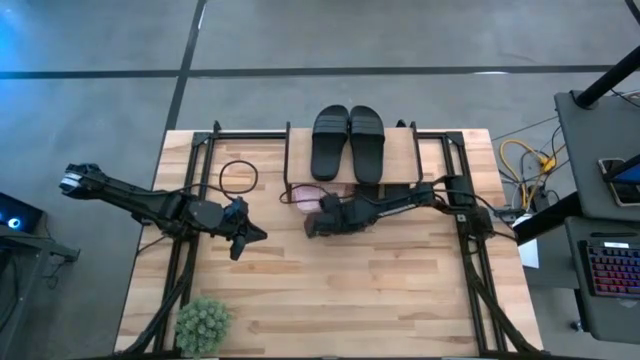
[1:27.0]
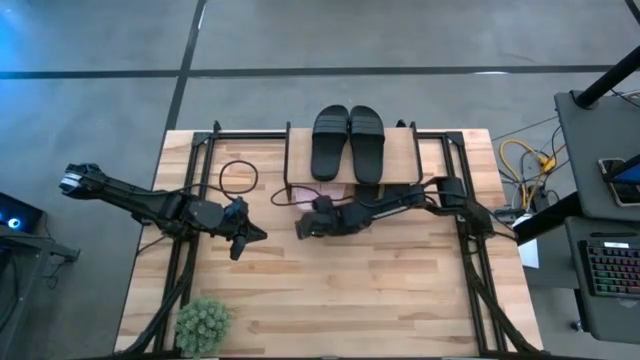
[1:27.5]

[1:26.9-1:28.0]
Task: Pick and place slides into the shelf
Adjust the left pink slide under the shelf

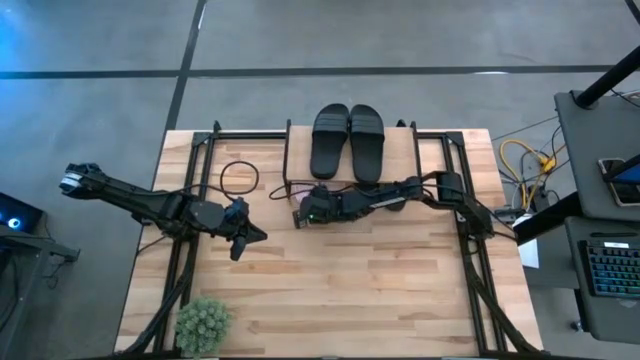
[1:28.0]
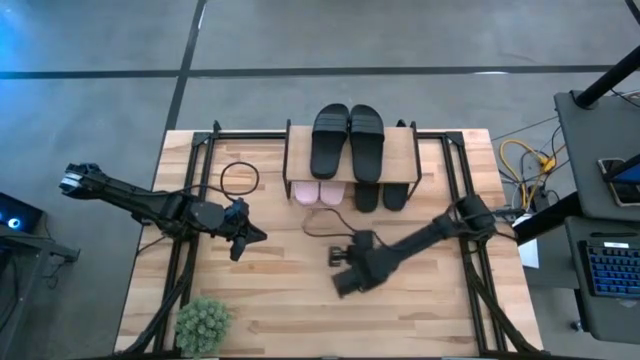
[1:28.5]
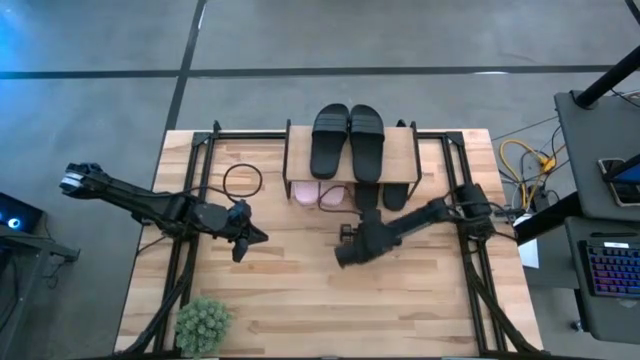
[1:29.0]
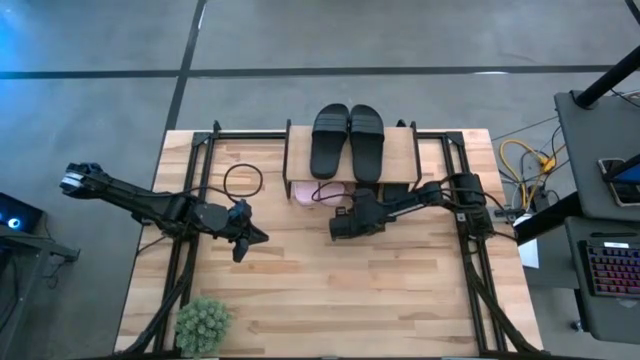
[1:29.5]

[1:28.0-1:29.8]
Adjust the left black slide under the shelf

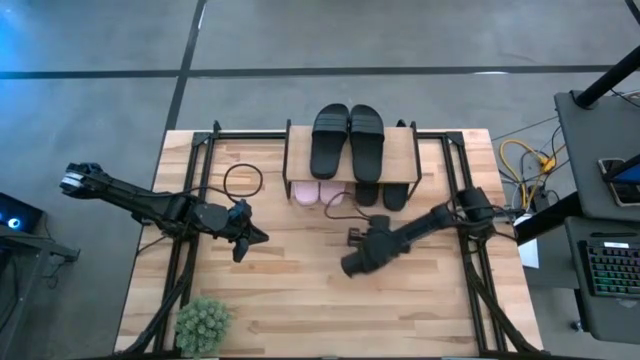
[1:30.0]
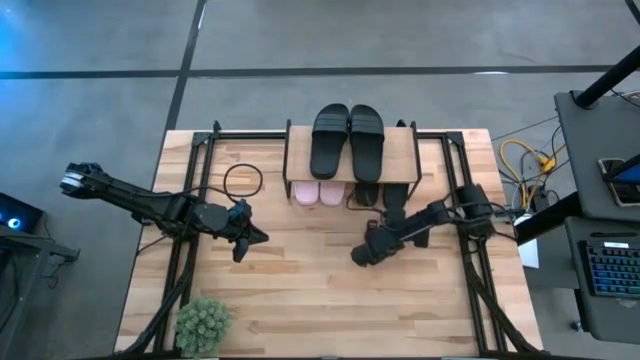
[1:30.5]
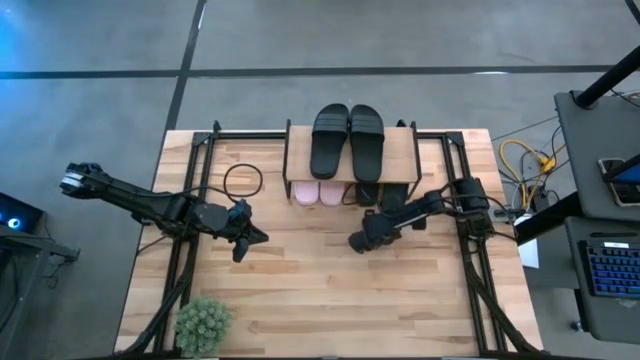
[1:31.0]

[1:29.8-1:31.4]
Adjust the right black slide under the shelf

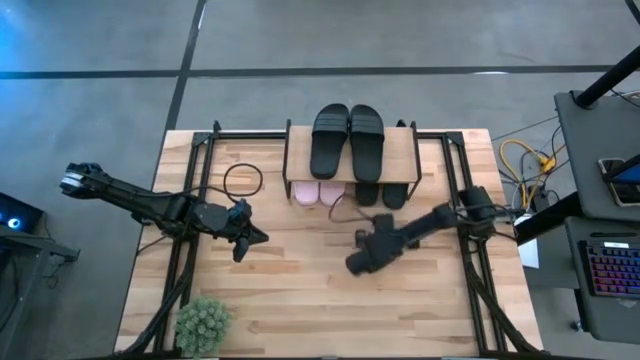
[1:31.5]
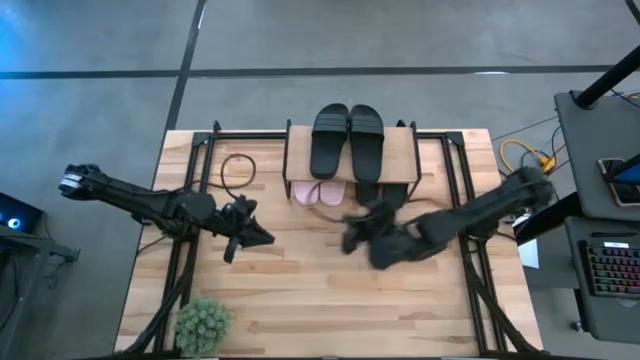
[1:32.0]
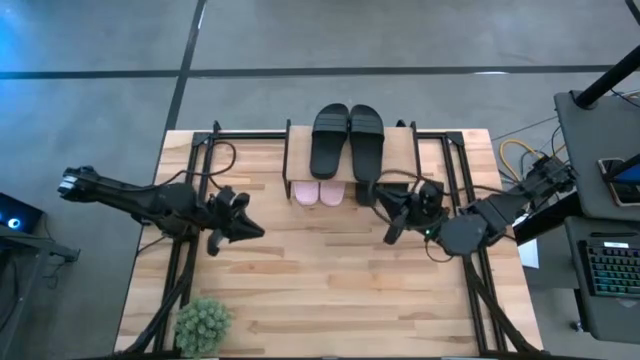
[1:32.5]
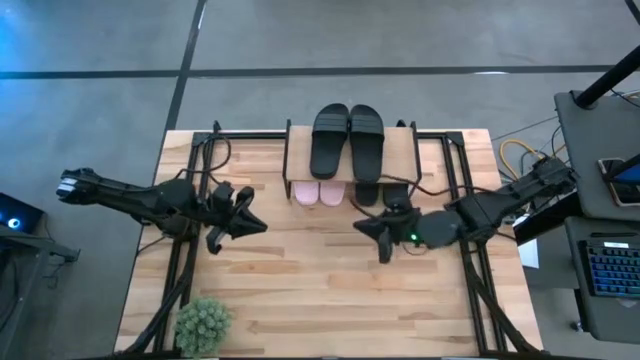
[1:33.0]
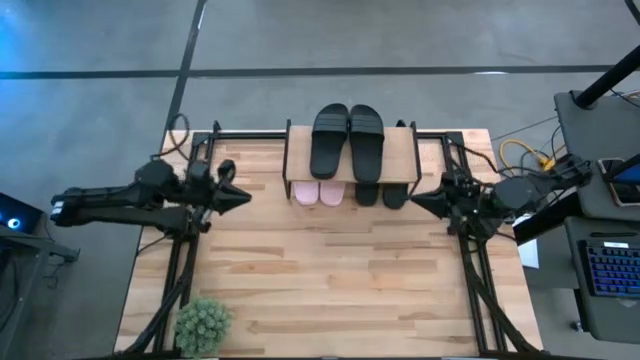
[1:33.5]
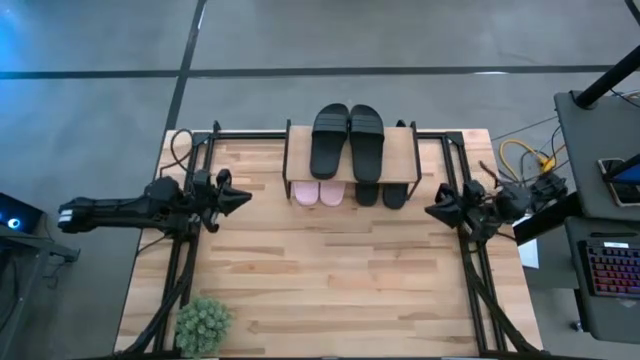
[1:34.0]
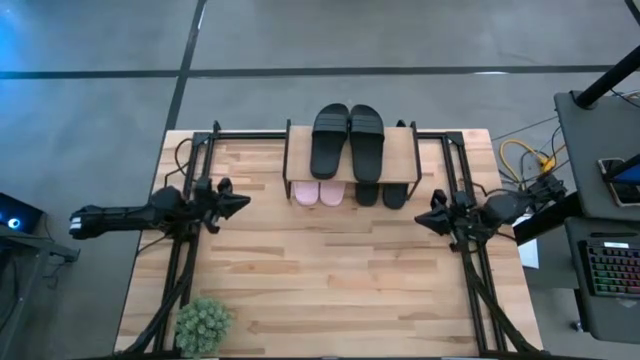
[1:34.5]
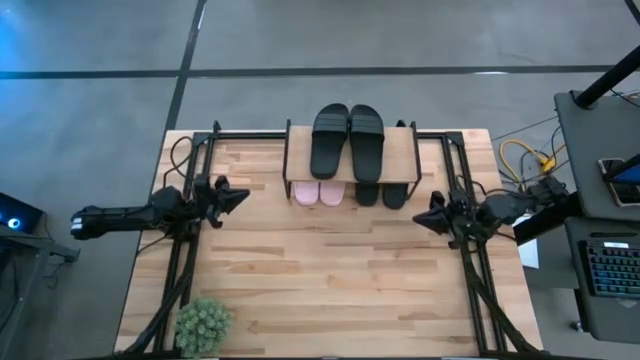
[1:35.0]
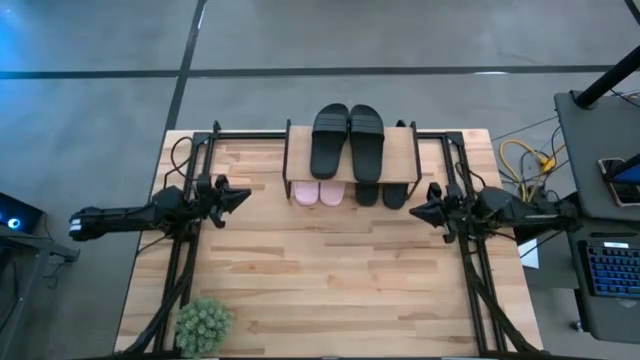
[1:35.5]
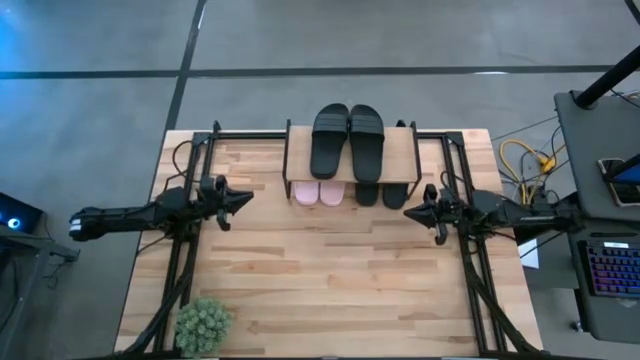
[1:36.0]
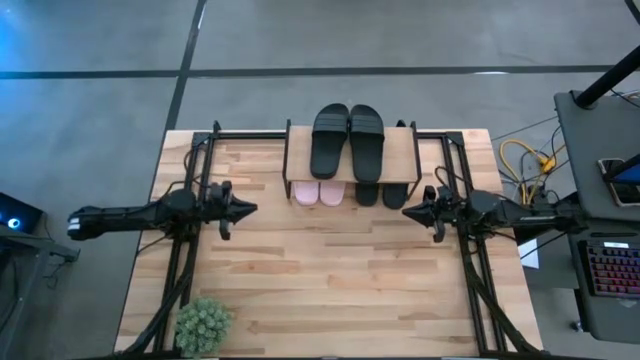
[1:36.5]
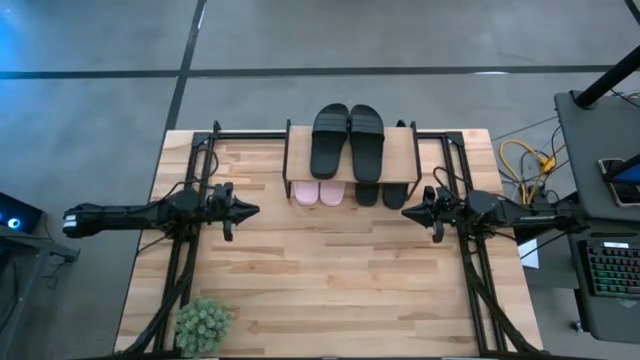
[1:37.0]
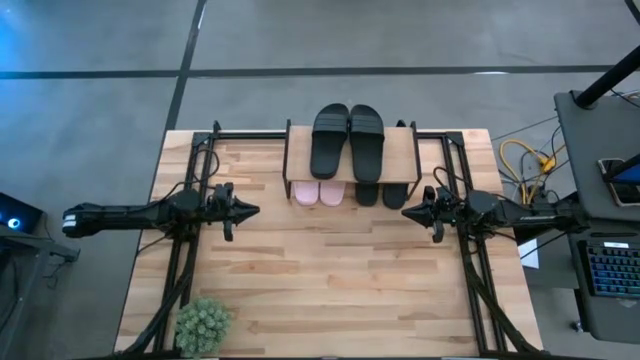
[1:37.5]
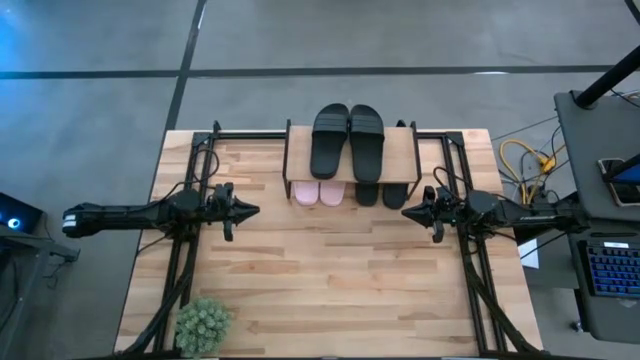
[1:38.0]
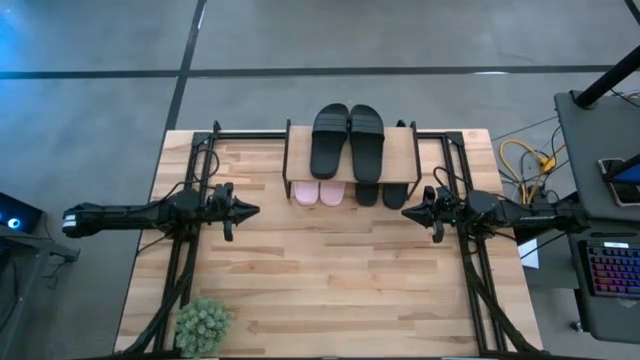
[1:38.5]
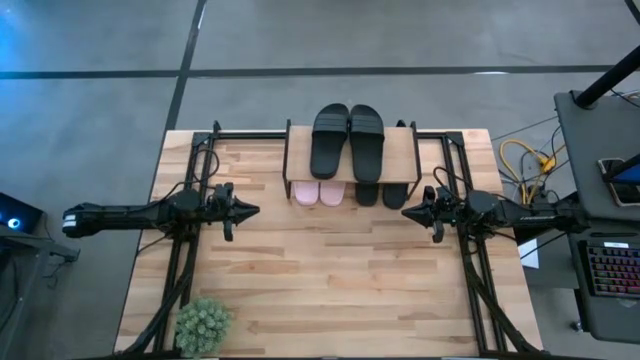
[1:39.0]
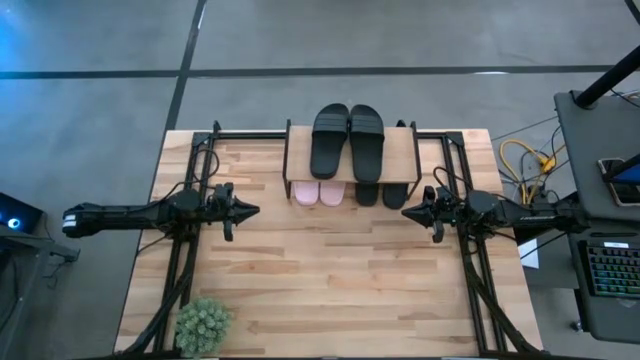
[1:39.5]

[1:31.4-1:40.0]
Return to Home Position

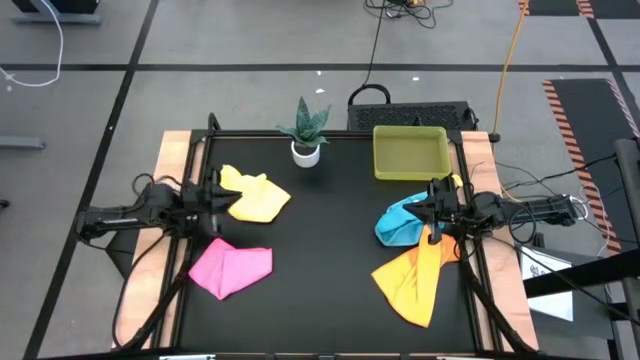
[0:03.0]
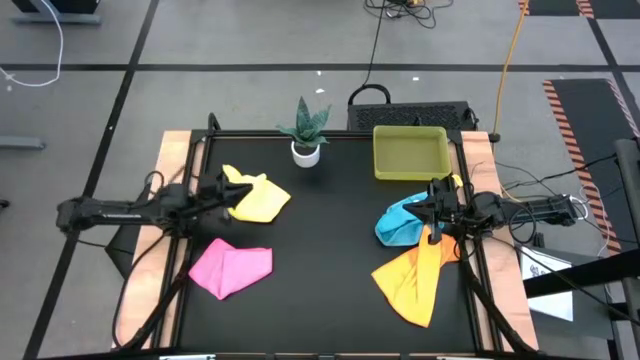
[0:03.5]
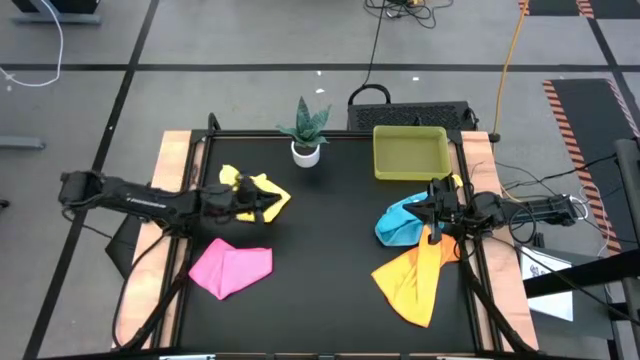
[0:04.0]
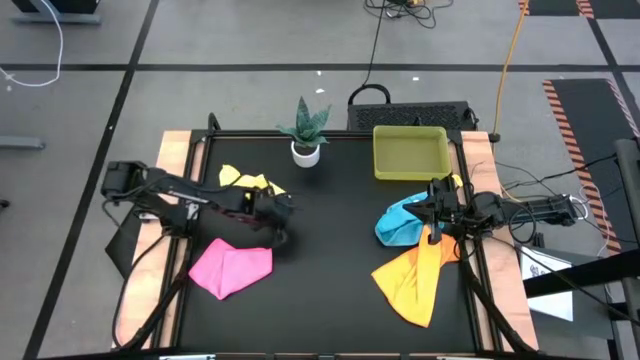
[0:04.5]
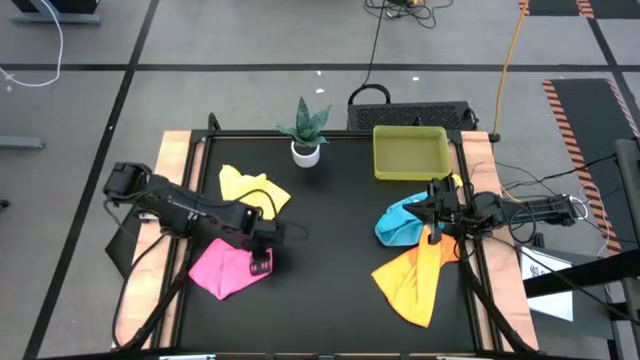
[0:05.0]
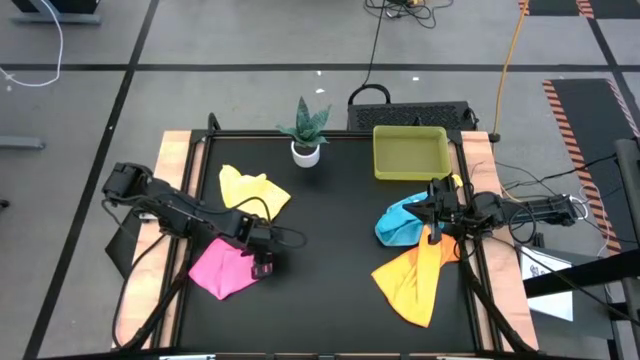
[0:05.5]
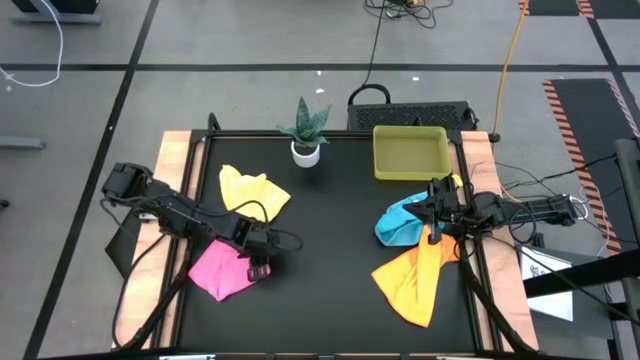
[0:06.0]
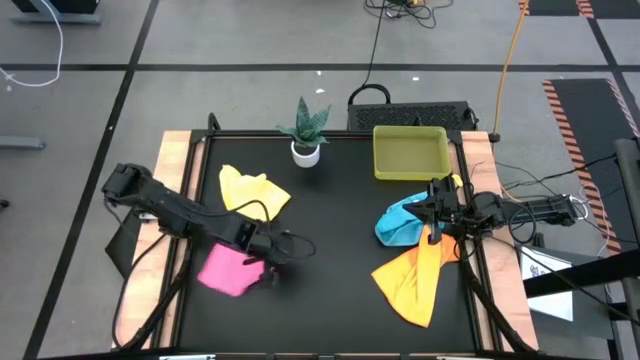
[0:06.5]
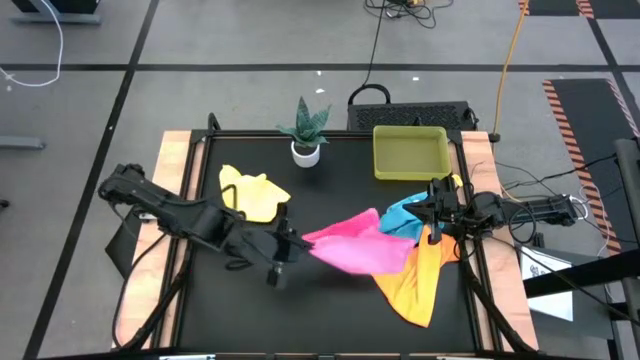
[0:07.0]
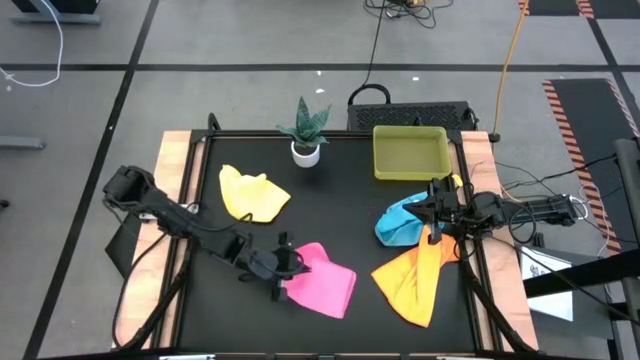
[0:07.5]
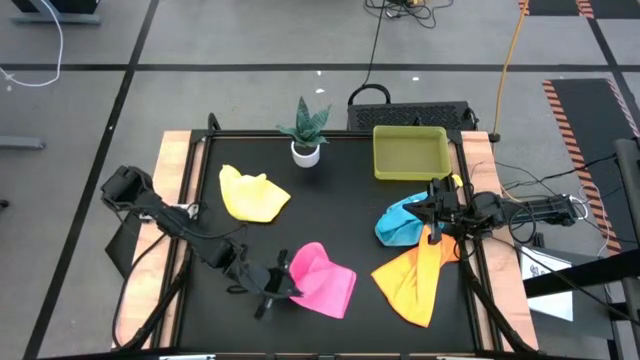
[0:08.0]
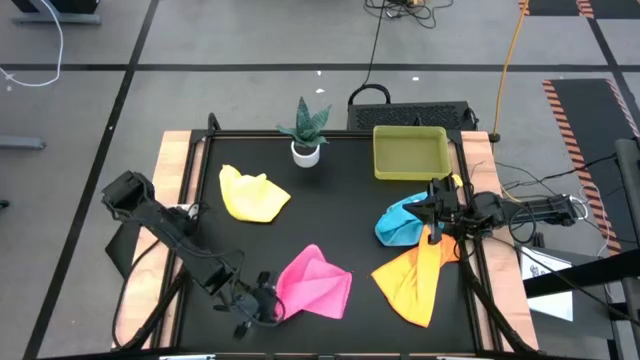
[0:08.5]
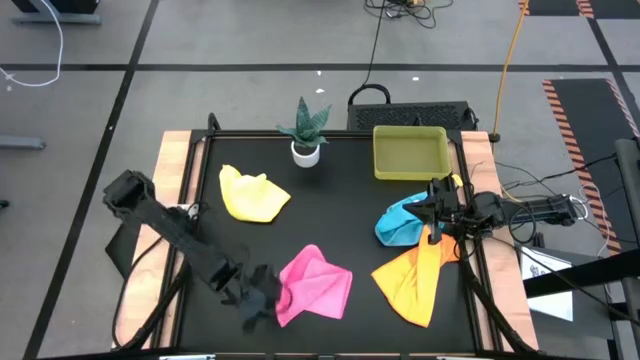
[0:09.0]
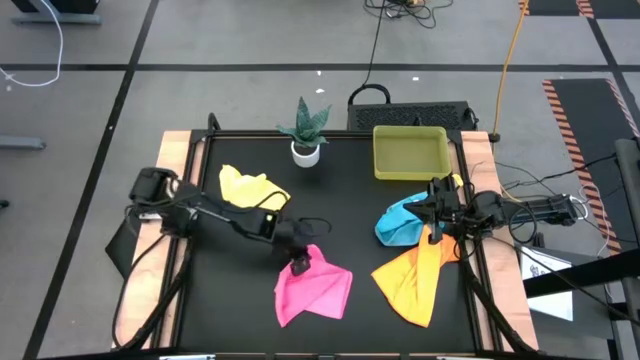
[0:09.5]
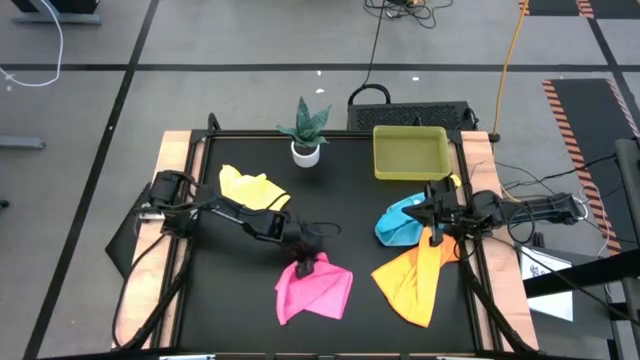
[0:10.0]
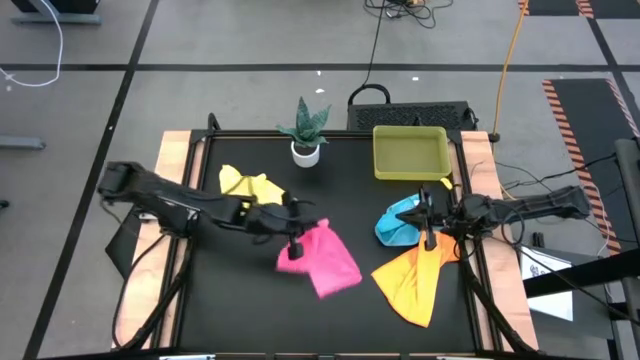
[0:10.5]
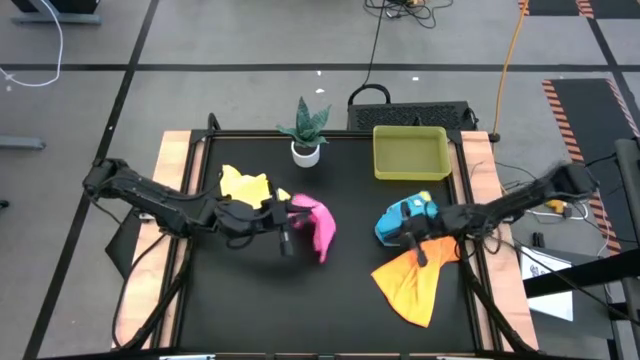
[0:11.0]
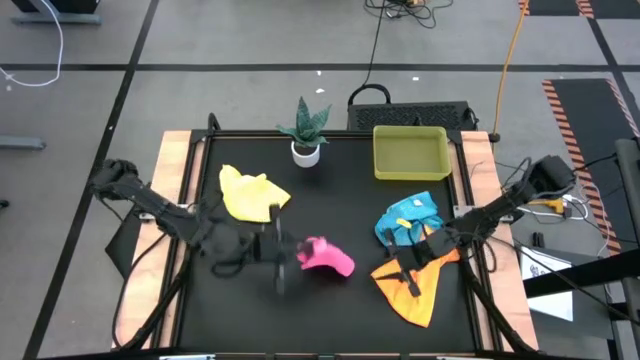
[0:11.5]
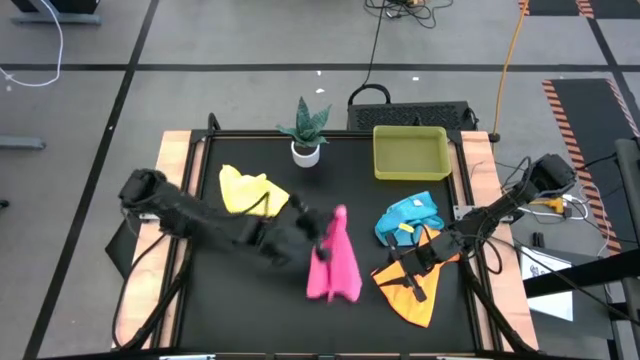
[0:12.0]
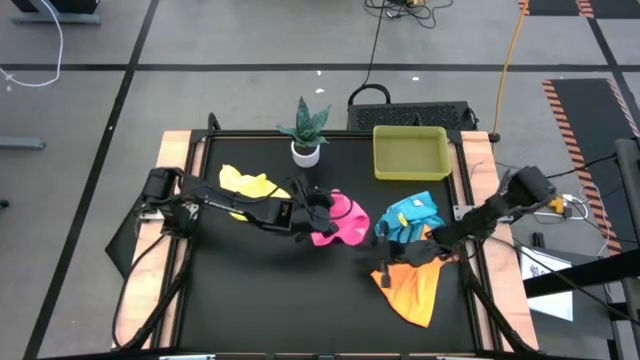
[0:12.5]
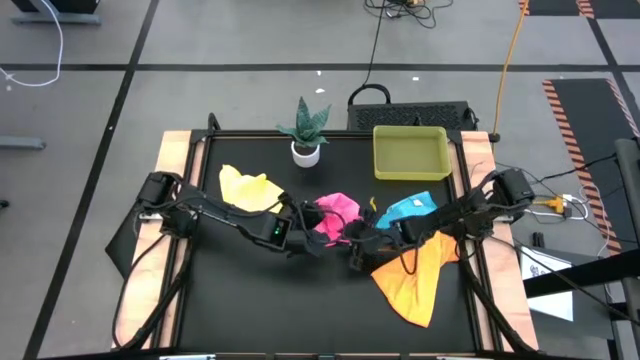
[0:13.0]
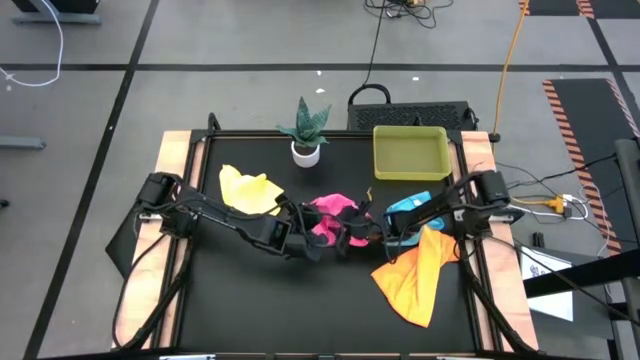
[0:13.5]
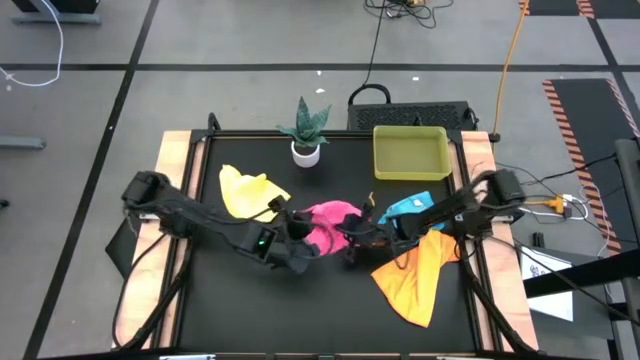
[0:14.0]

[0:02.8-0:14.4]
Task: Fold microfiber towels
Fold the pink microfiber cloth
